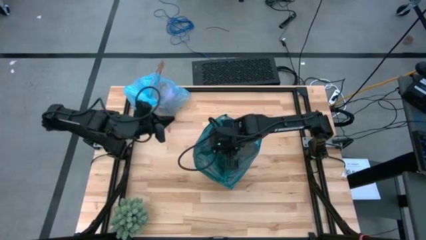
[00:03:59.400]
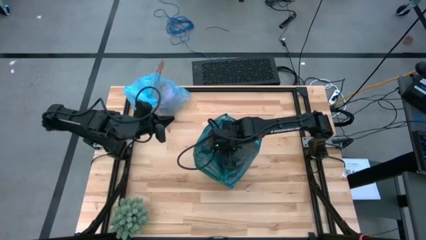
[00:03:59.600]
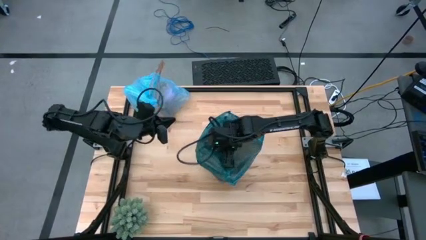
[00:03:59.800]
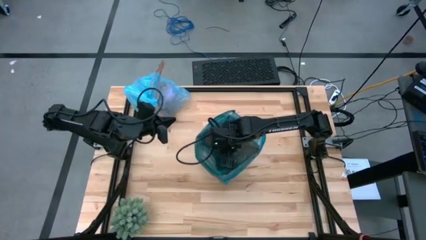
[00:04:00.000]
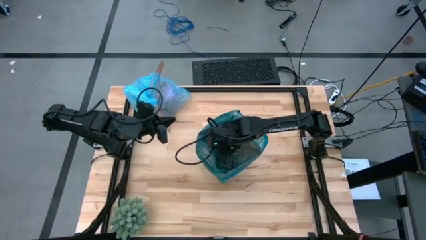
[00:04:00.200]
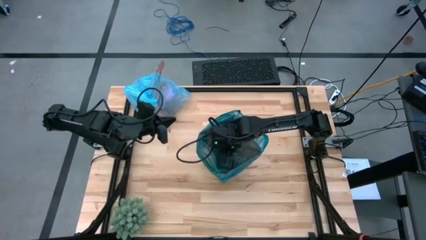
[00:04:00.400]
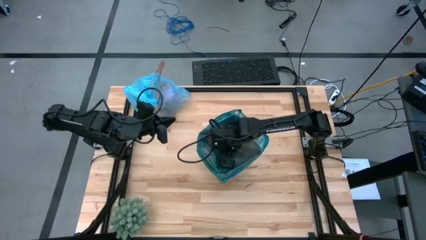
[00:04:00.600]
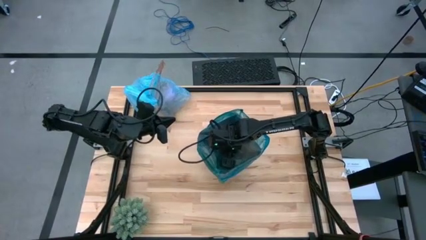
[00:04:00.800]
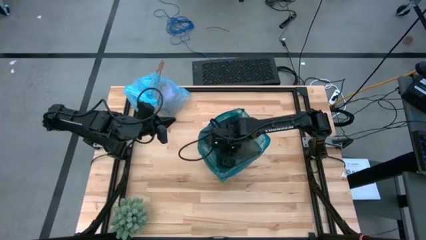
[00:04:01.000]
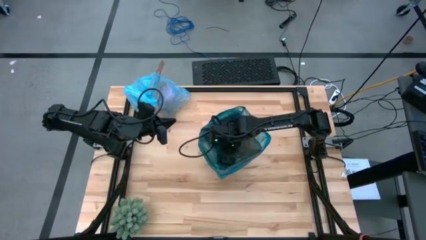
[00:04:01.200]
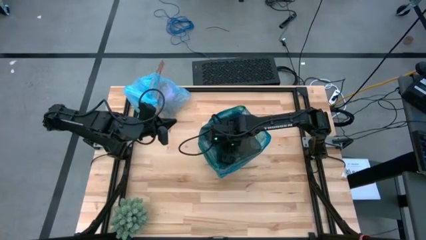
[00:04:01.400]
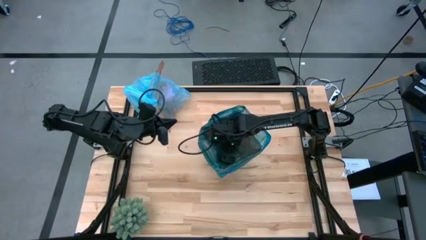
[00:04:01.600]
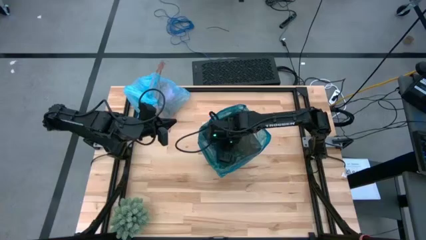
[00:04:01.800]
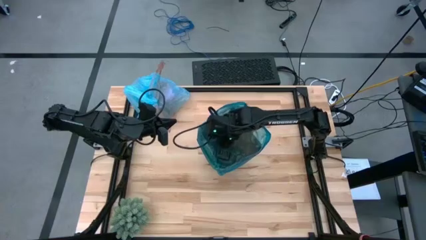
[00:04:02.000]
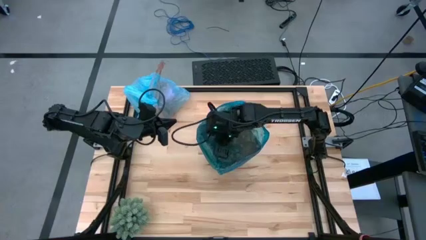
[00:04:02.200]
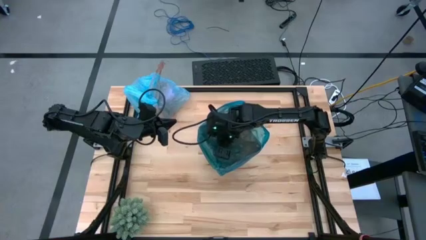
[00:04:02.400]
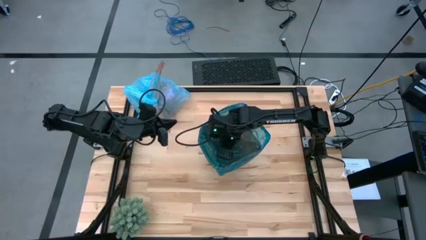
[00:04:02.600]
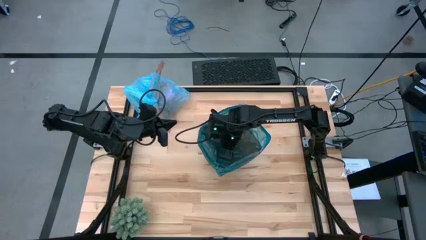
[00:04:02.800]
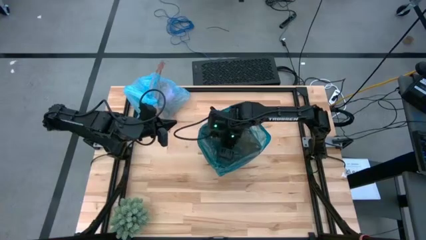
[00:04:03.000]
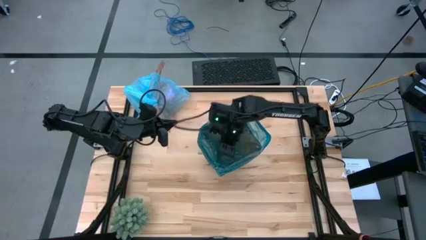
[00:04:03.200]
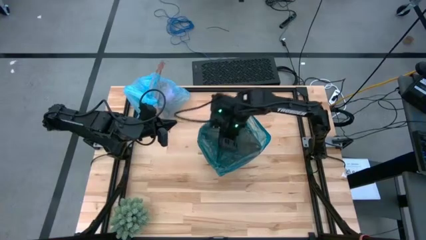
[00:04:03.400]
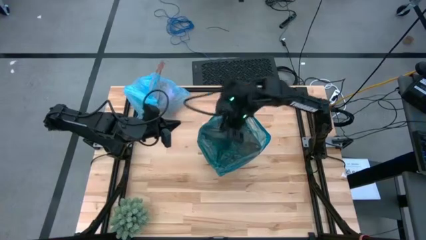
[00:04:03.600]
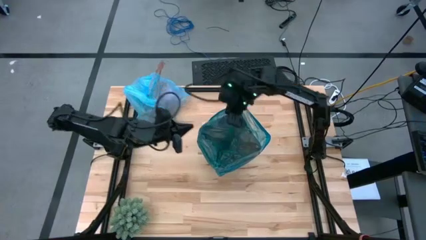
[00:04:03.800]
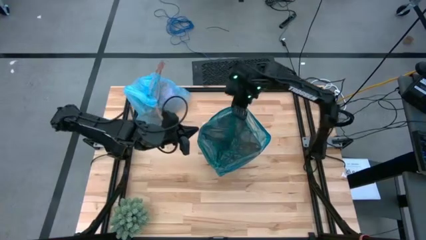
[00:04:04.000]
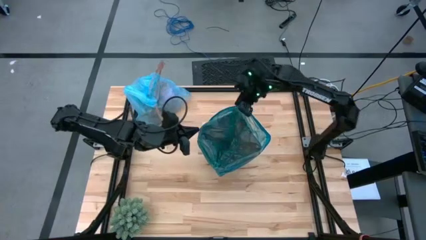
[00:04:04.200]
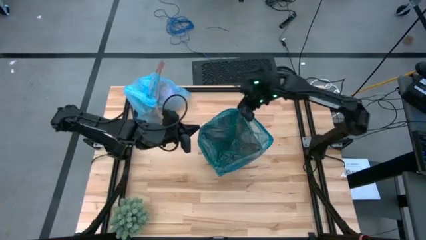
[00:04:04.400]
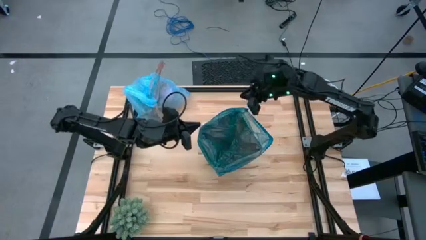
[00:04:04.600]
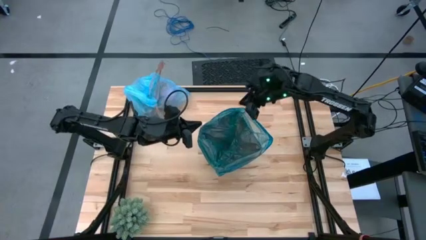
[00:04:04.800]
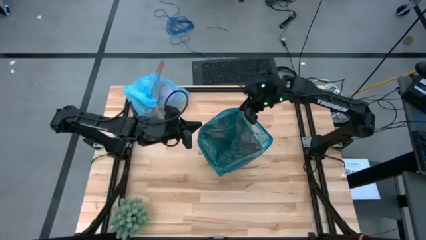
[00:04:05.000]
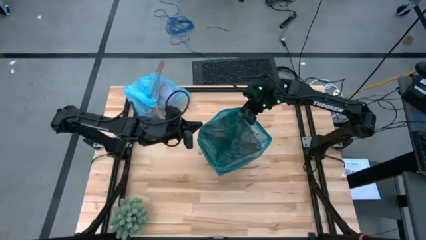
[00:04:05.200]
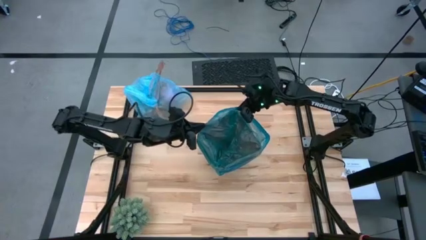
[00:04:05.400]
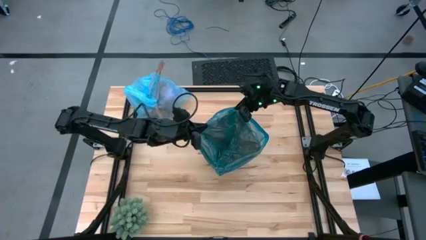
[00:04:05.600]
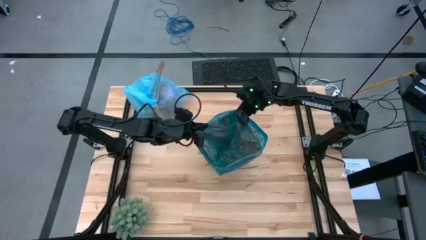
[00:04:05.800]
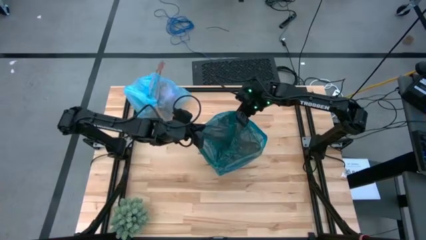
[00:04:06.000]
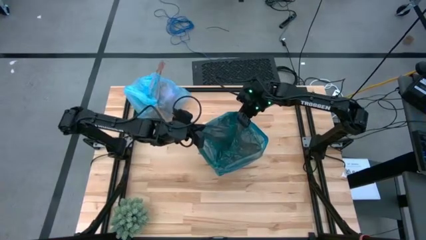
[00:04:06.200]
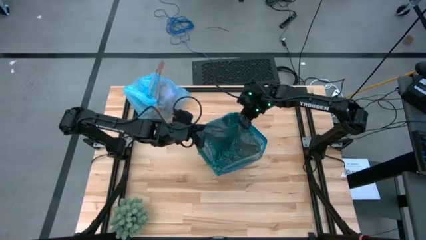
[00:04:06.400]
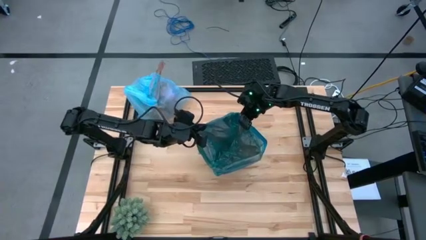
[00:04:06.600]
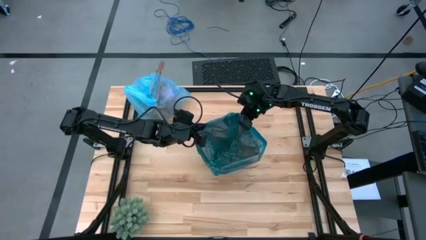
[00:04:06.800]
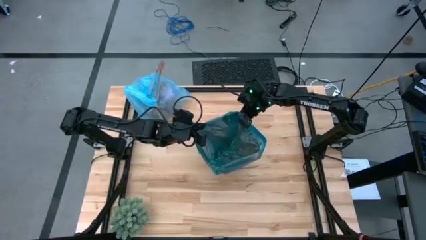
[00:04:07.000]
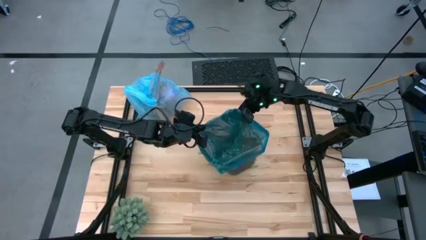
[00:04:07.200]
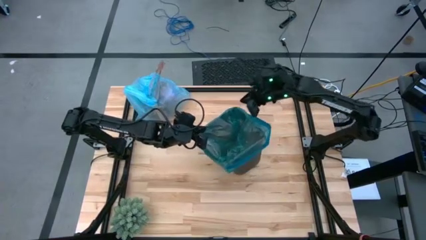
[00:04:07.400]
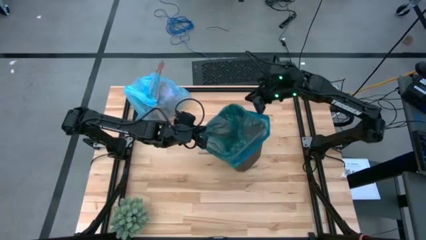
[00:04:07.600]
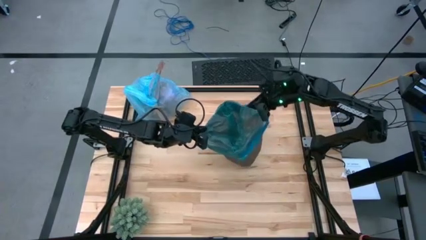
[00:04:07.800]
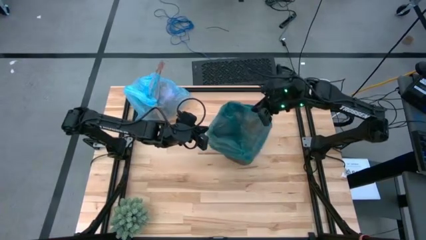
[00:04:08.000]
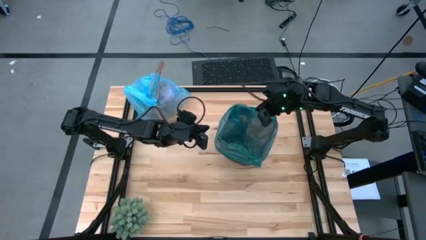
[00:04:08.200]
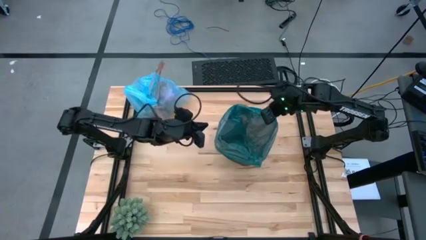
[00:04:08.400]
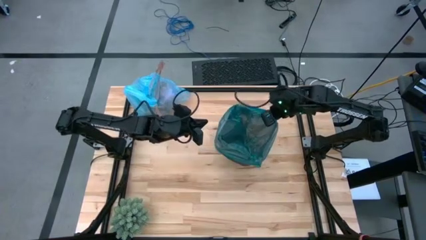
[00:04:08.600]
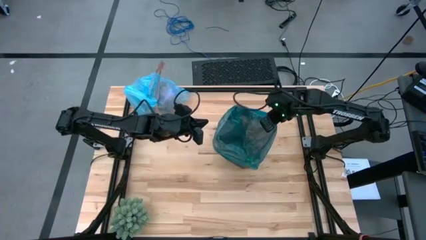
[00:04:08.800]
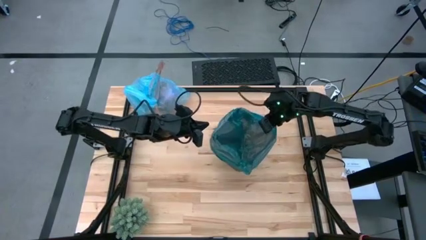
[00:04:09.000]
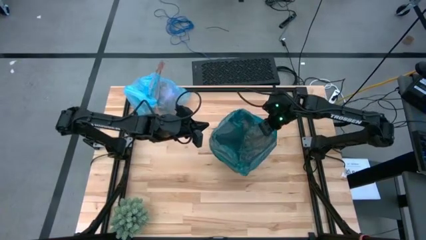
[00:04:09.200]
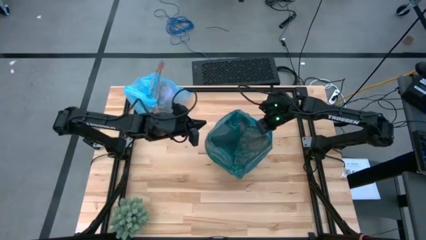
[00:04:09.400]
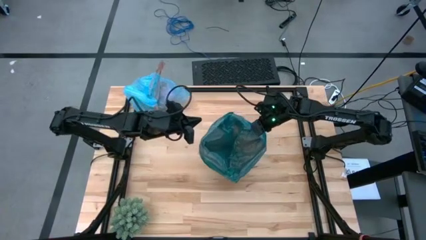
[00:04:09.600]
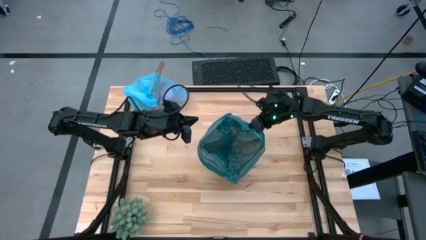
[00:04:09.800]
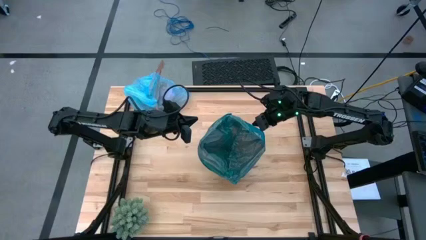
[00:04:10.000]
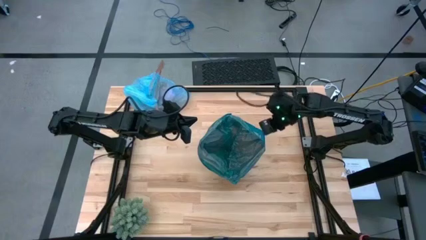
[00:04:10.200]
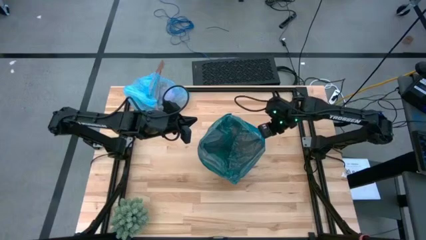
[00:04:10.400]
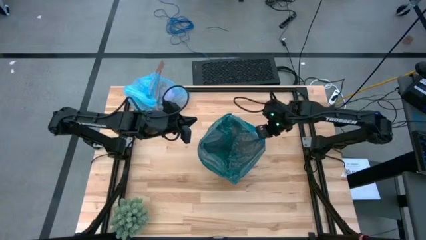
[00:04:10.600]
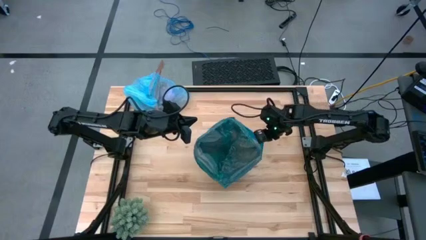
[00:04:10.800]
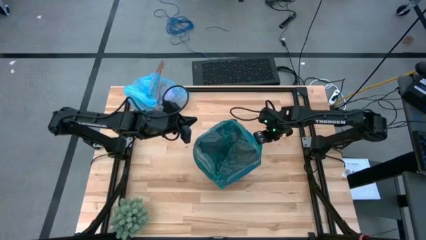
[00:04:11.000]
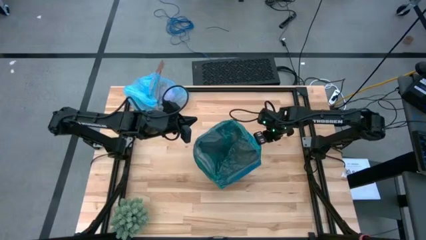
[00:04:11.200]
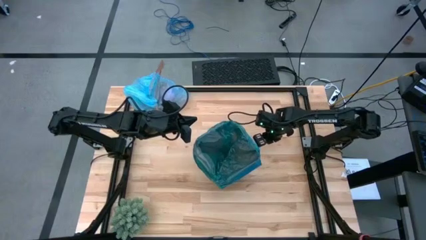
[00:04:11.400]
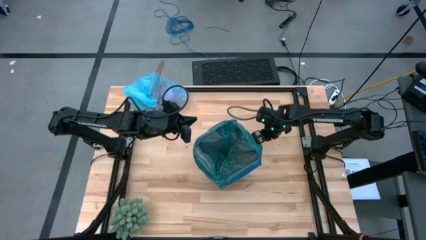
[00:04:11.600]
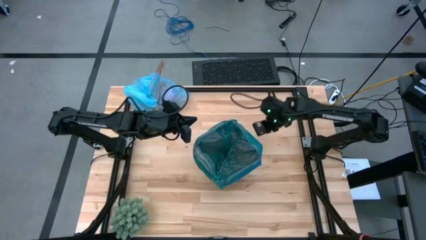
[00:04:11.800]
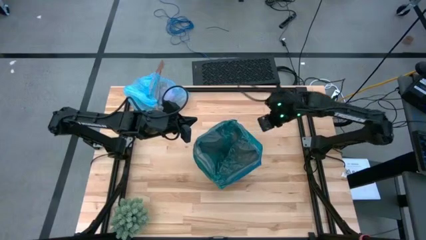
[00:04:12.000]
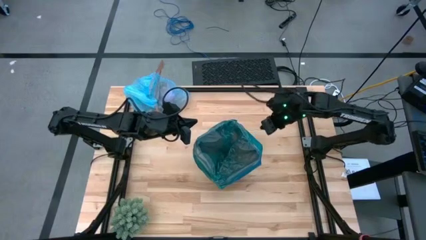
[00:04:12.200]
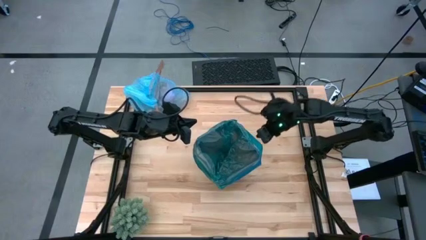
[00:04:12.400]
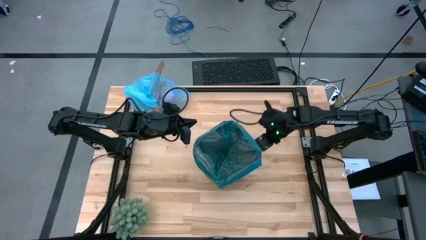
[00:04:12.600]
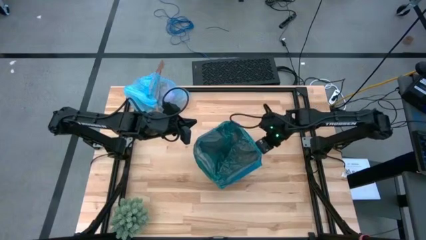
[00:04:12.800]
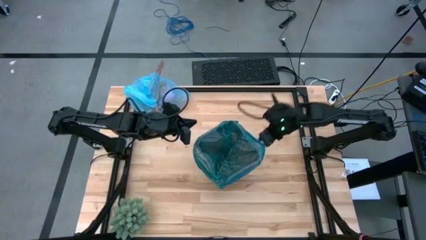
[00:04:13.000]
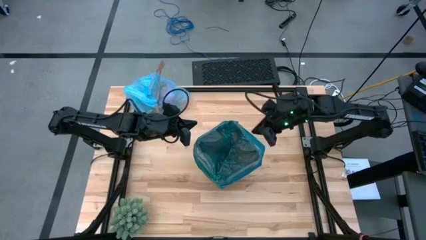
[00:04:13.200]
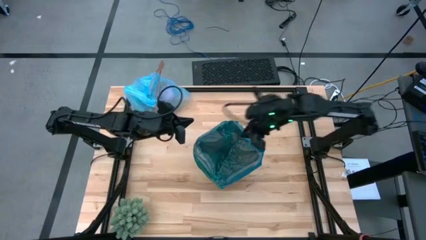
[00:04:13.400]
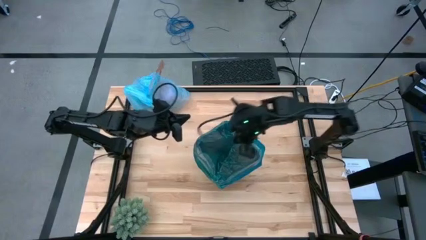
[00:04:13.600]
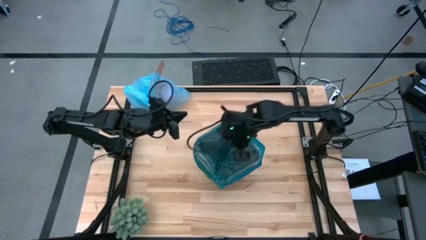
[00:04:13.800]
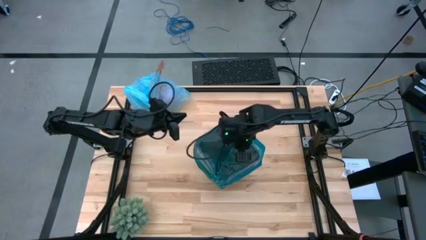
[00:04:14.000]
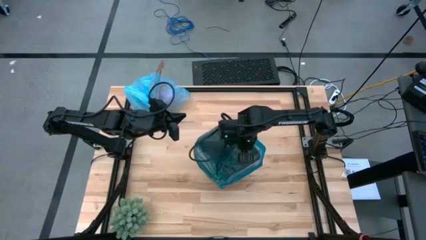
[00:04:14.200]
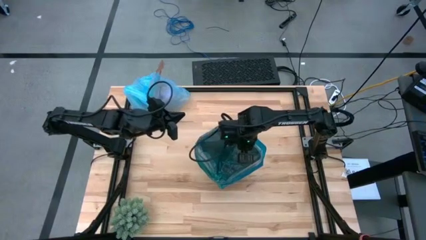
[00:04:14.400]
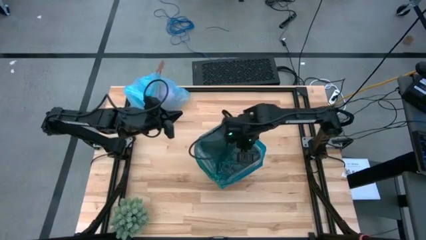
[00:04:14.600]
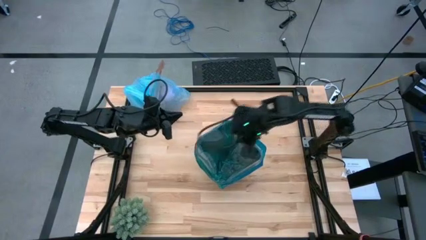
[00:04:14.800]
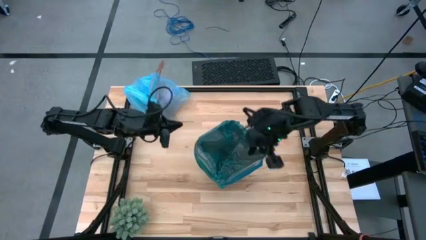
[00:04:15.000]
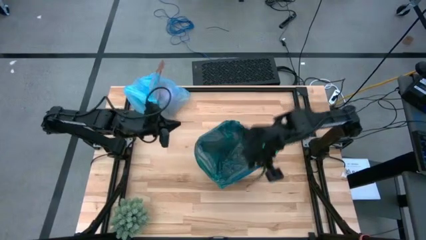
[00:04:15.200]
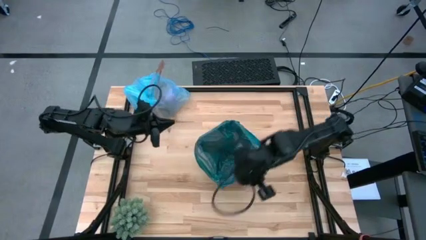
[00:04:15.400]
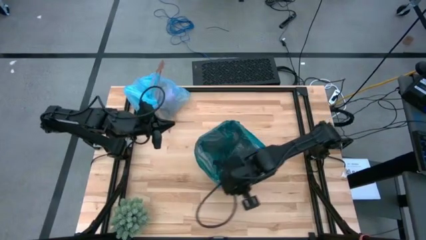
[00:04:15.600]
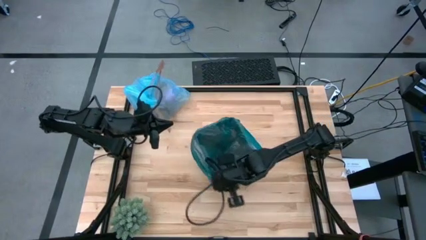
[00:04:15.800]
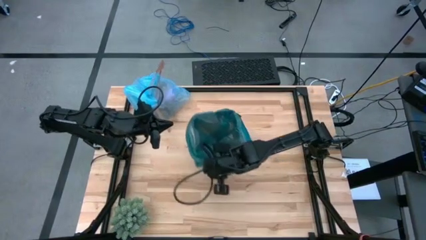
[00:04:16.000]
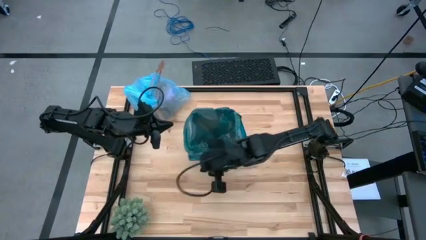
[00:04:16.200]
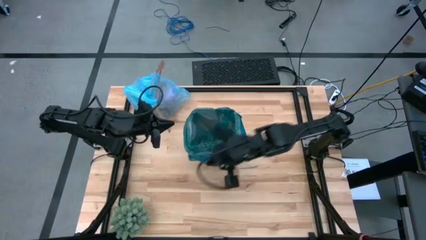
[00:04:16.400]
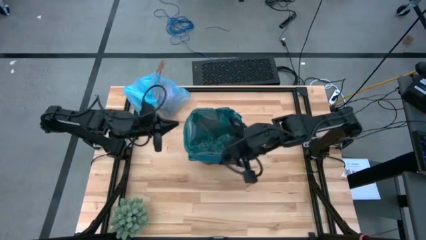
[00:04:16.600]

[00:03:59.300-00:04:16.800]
Task: place trash/remove bag and relplace
Insert the blue trash bag into the black trash bin
